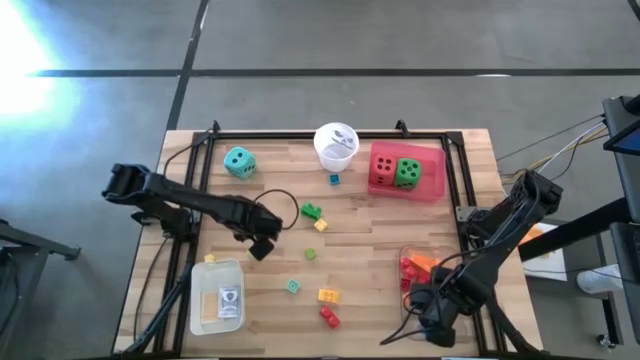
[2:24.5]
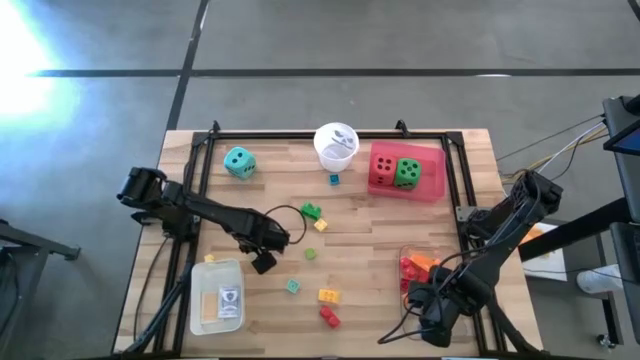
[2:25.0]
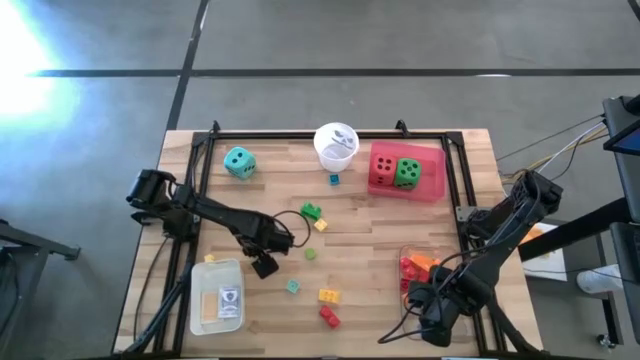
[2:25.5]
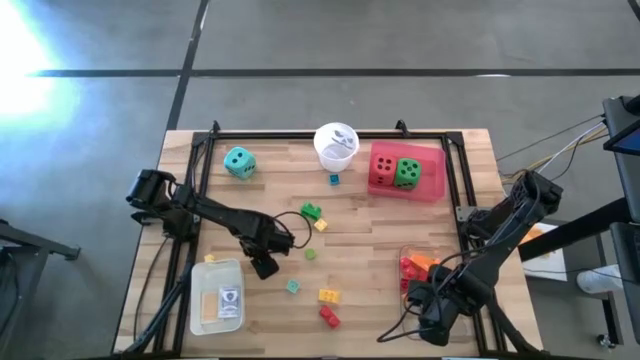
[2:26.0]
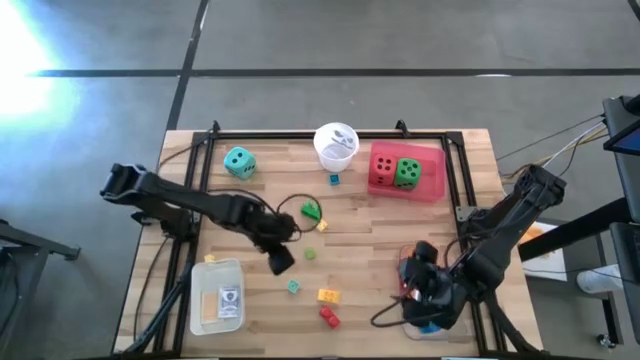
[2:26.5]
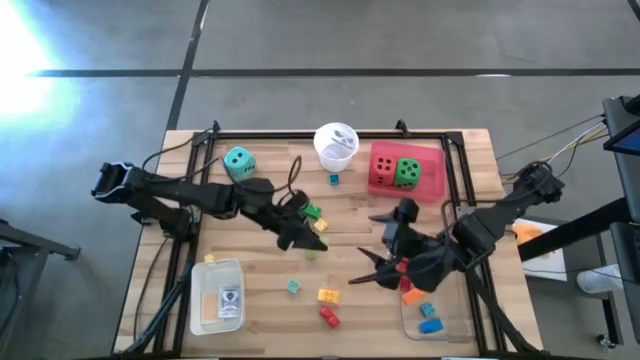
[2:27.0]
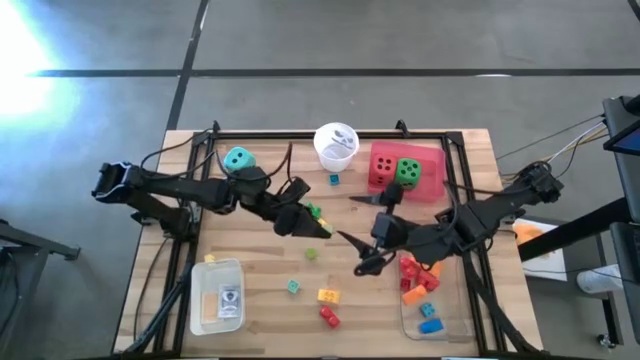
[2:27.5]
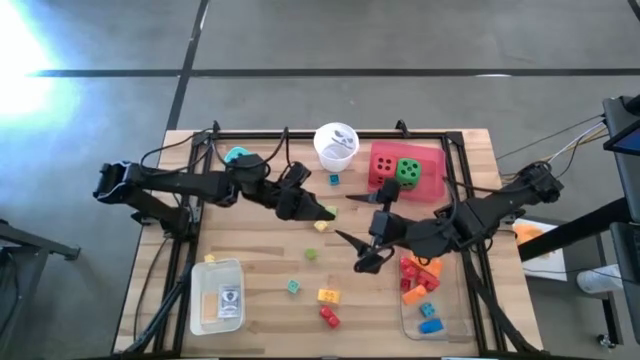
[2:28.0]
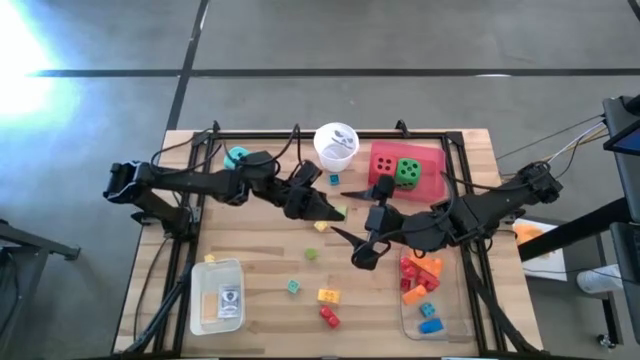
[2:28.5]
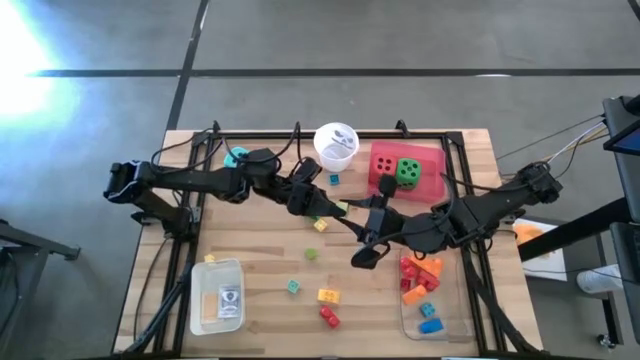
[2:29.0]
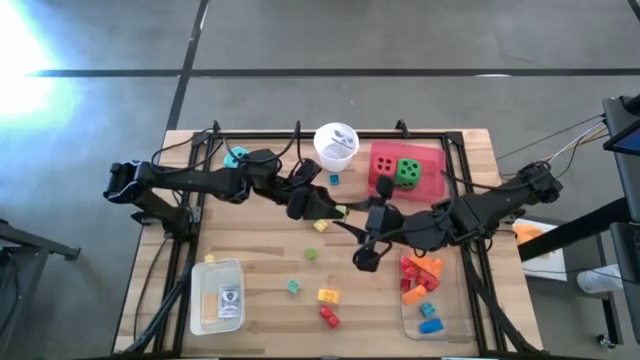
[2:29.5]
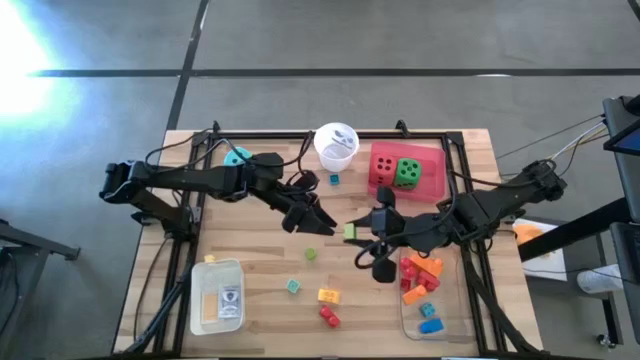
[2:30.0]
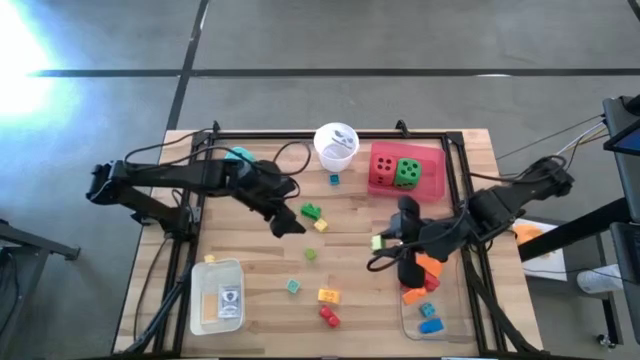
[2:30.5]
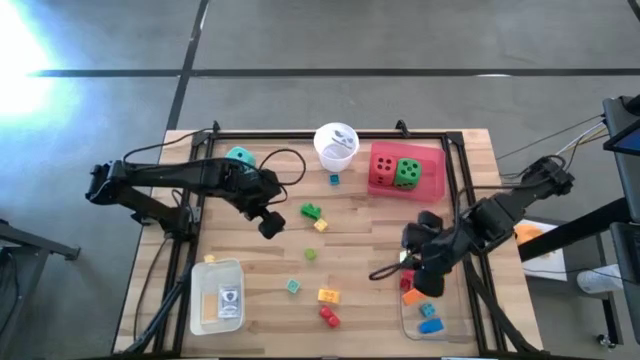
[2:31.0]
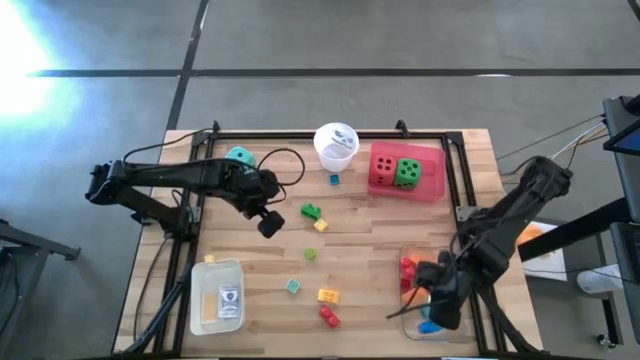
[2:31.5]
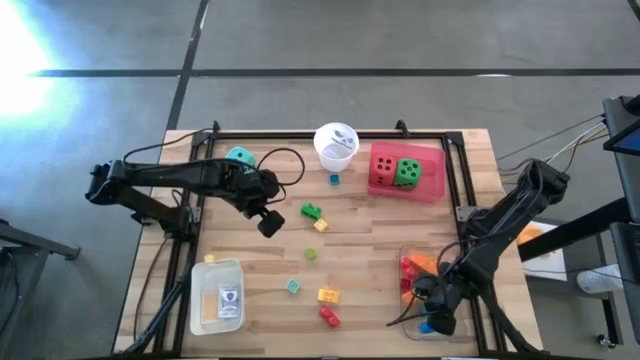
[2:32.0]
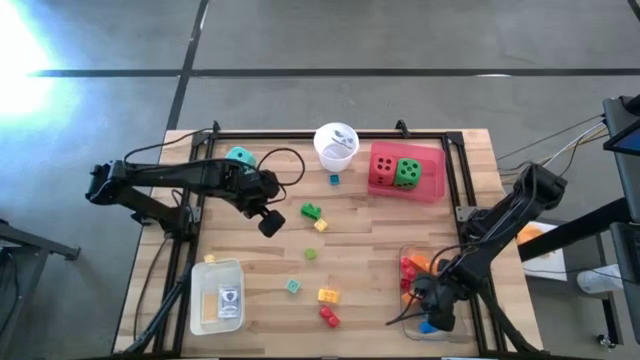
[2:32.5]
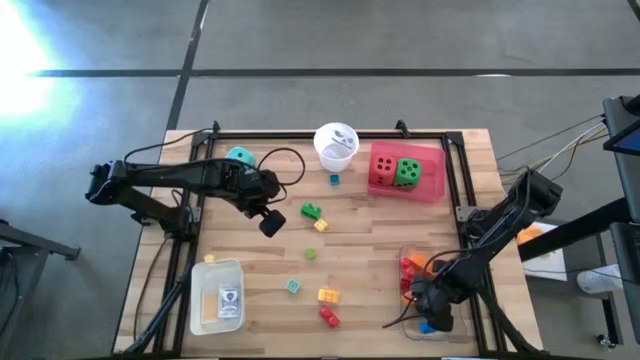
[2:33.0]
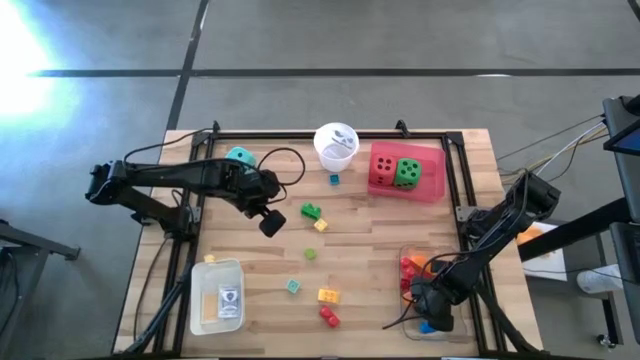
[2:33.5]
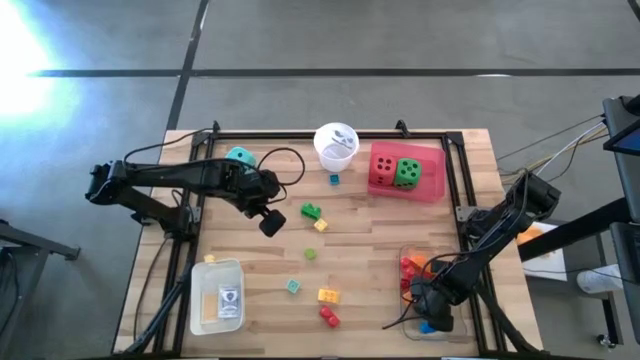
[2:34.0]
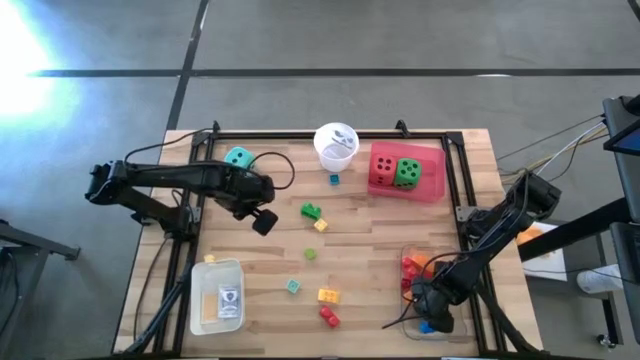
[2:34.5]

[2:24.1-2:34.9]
Task: Pick & Place Toys
Put the light green game piece into the transparent bin

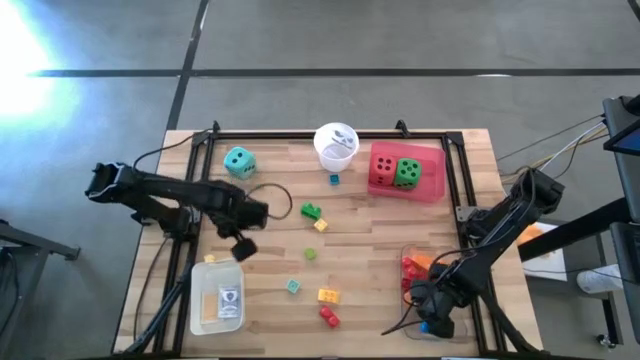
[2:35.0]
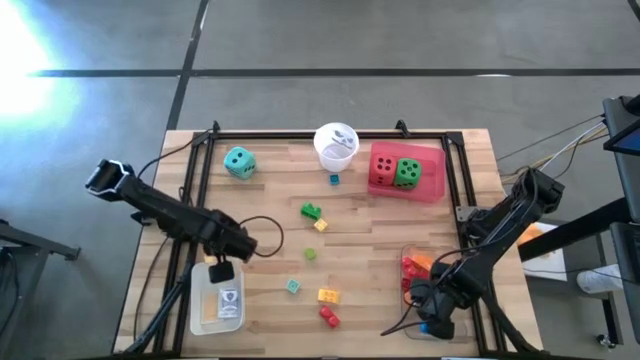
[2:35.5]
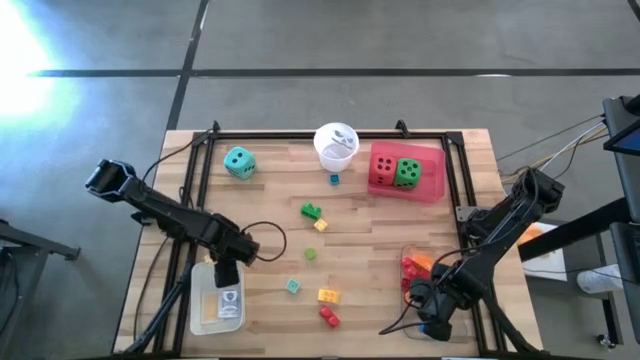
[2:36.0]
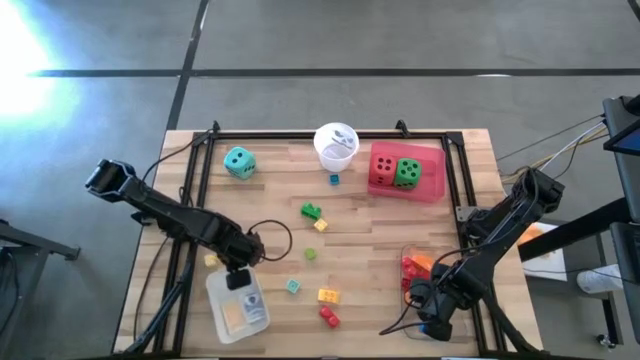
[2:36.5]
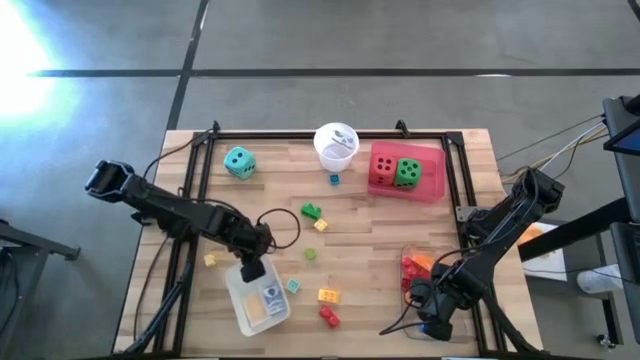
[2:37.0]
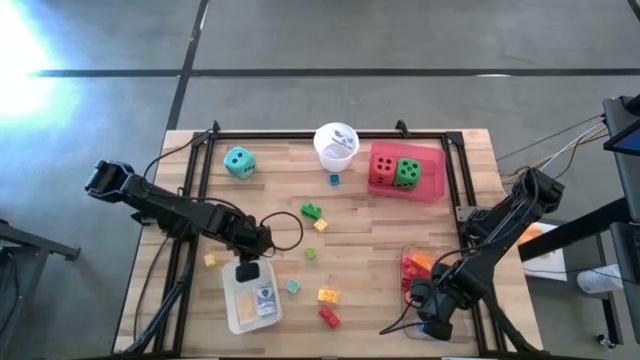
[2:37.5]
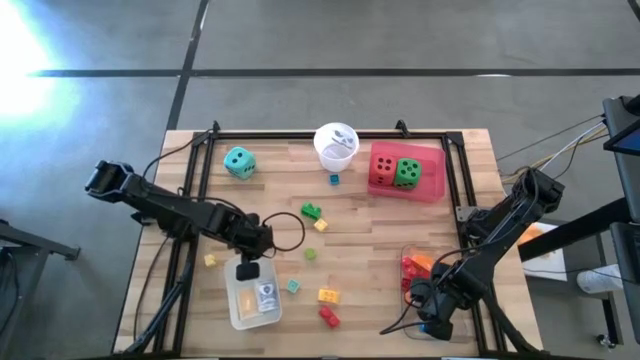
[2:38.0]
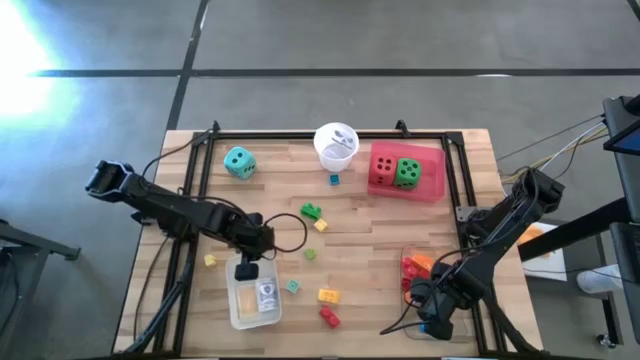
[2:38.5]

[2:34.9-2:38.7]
Adjust the white bin

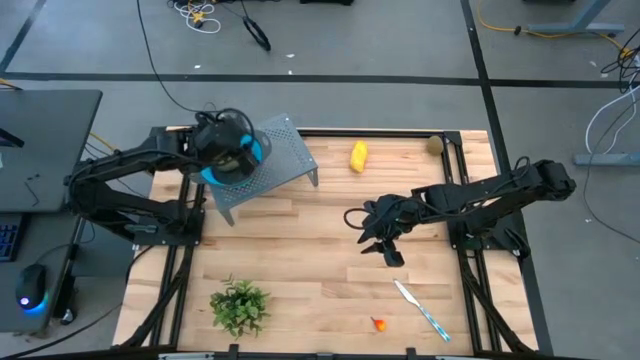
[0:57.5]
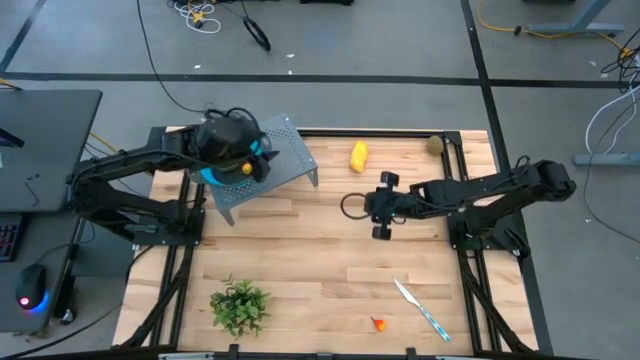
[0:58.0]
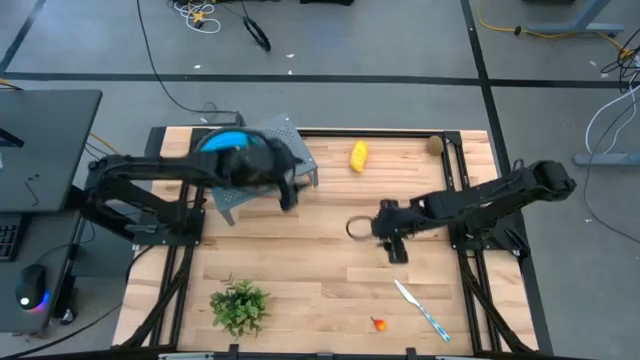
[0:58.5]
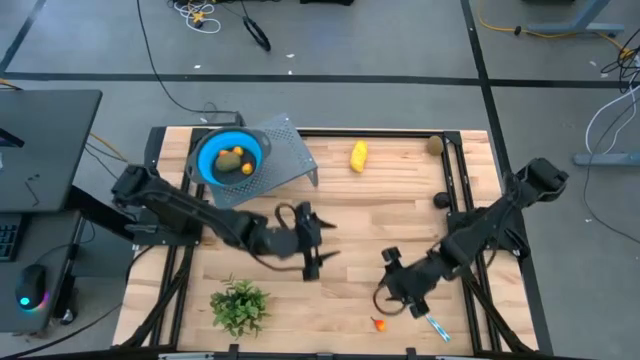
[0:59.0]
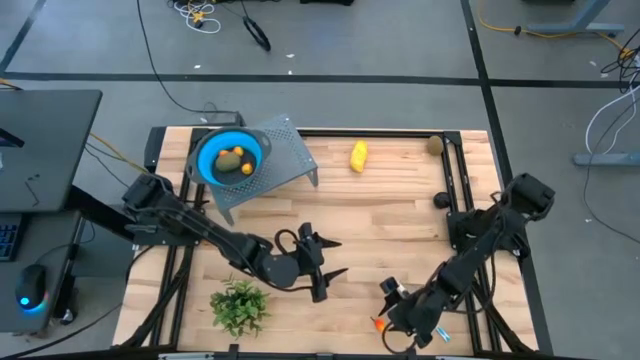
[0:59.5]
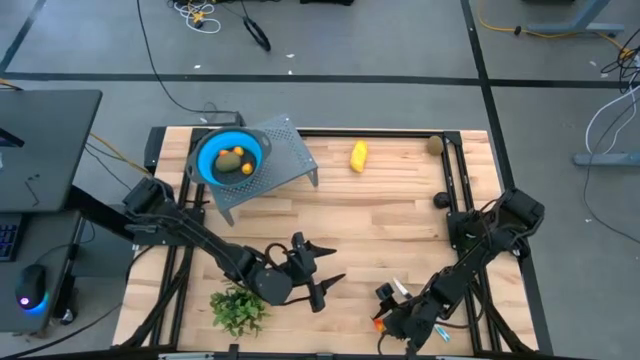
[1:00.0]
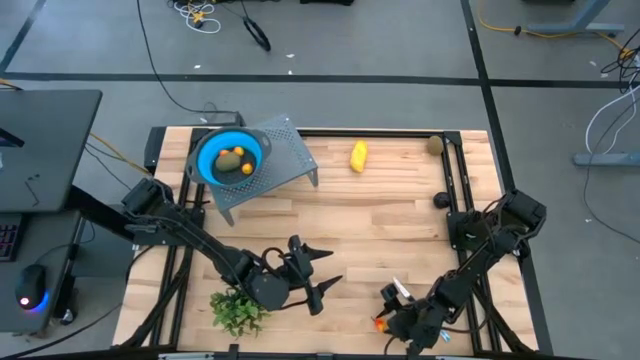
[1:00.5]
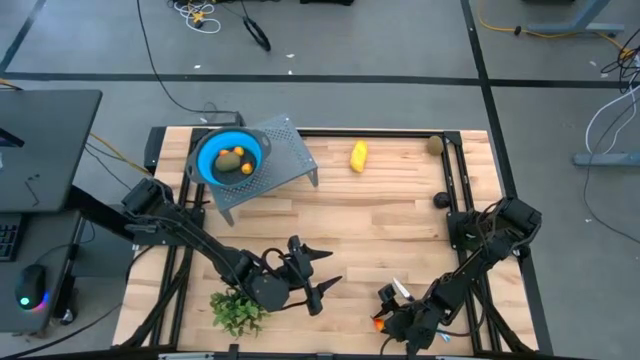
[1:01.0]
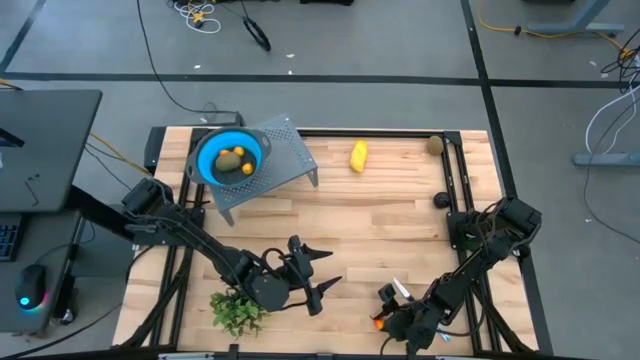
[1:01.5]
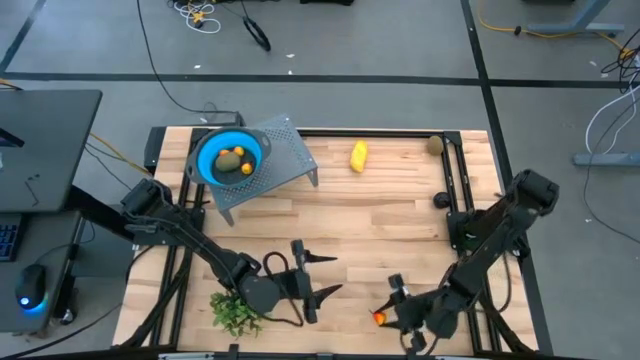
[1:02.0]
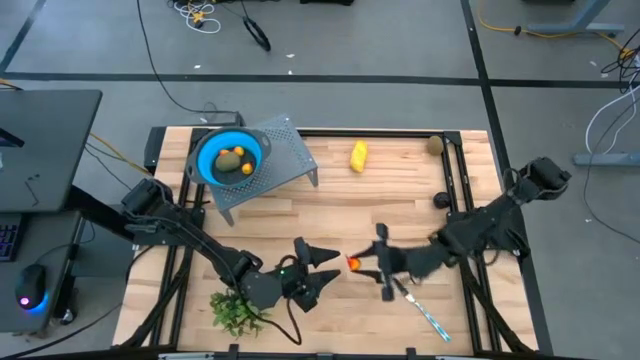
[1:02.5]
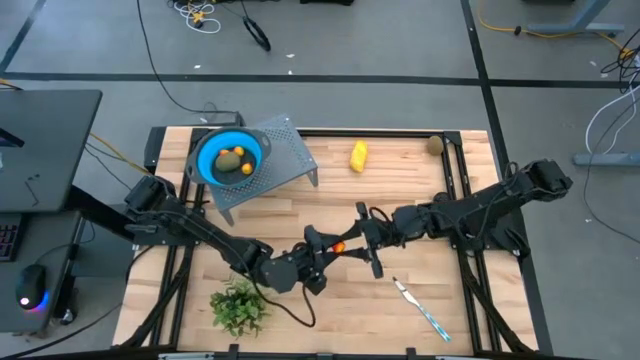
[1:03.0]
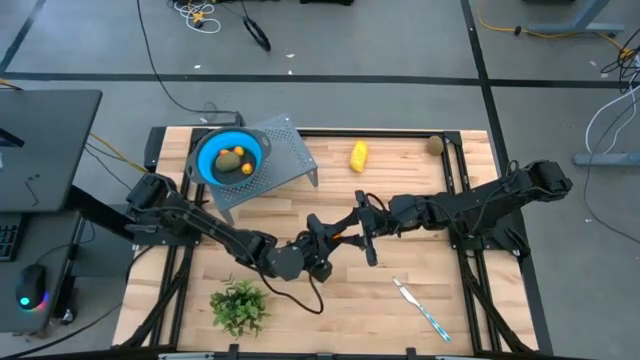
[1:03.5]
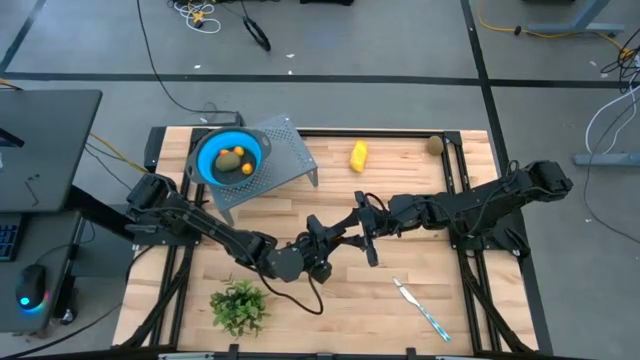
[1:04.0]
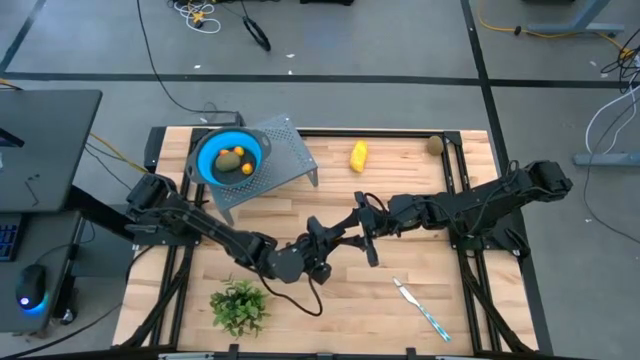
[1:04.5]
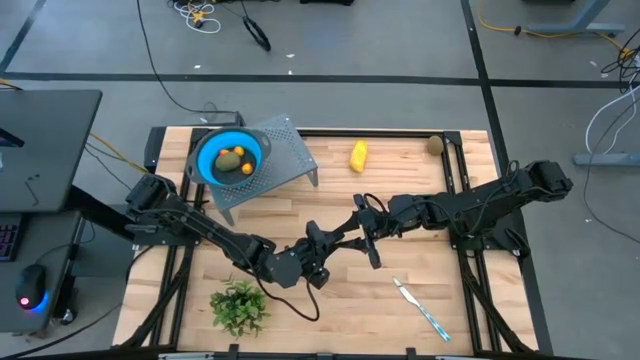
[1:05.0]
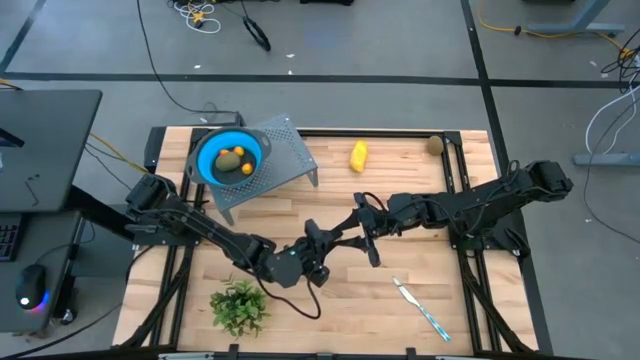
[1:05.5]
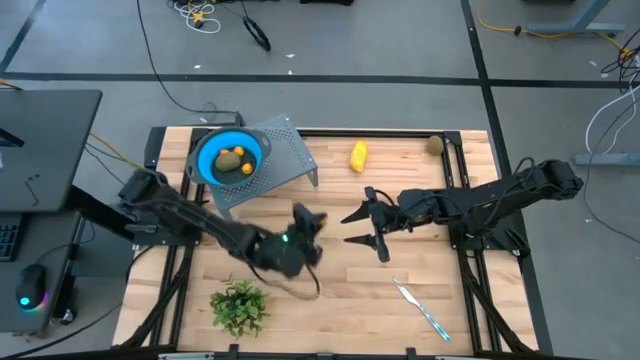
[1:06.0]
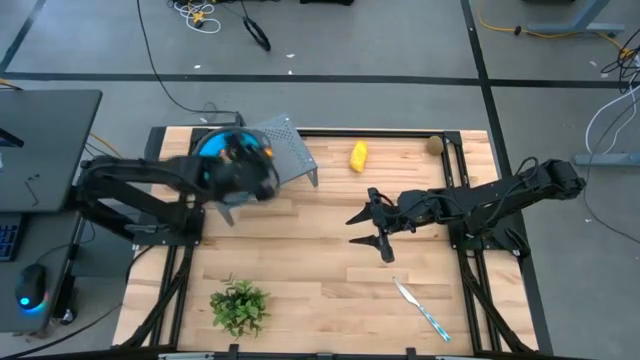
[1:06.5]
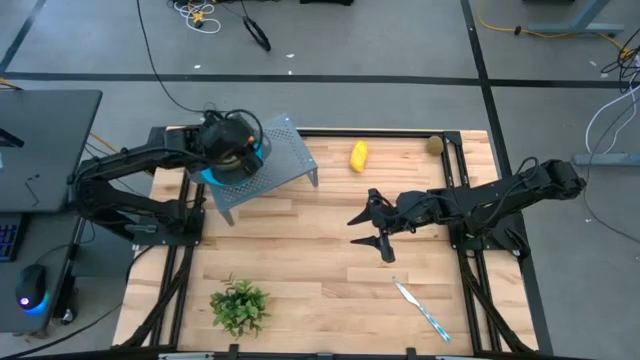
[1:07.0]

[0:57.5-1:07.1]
Task: Pick & Place Fruit
Put the yellow pear into the blue strainer bowl on the shelf
